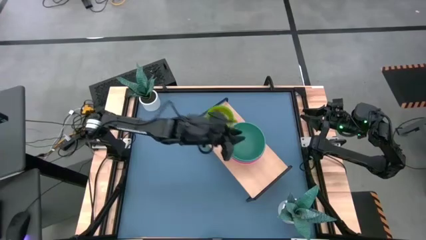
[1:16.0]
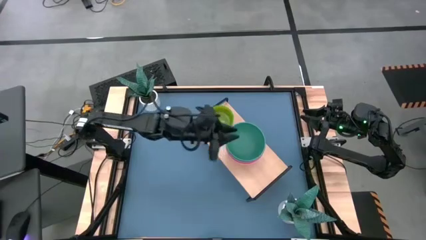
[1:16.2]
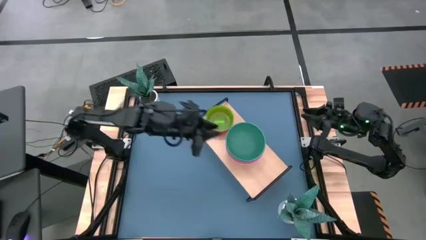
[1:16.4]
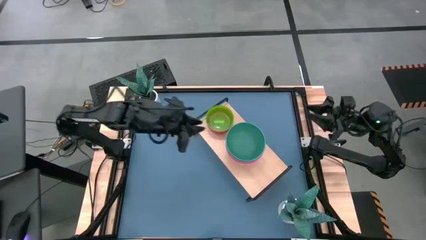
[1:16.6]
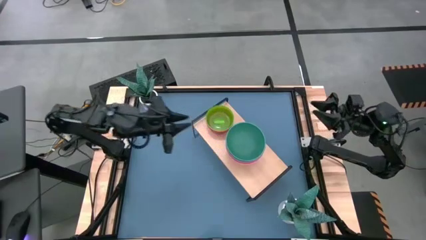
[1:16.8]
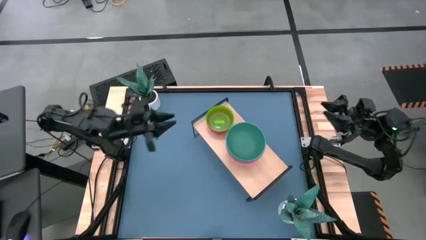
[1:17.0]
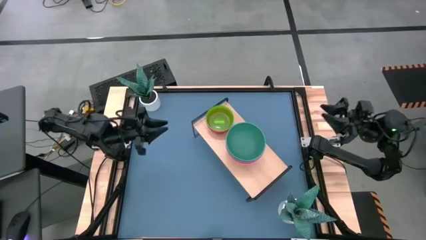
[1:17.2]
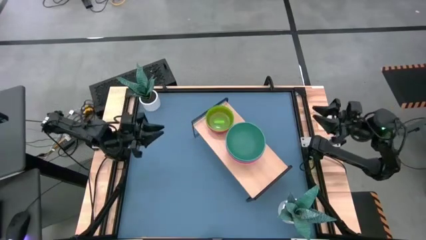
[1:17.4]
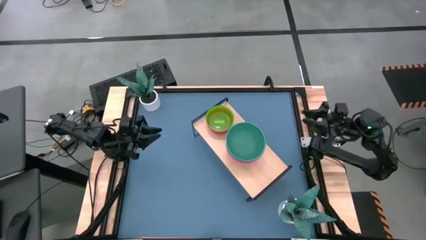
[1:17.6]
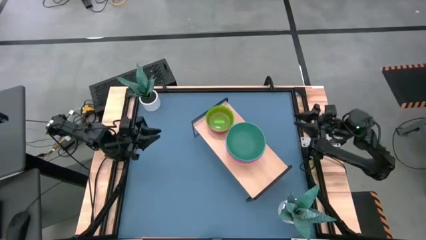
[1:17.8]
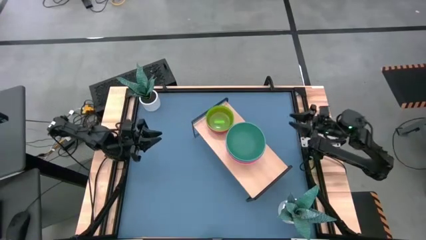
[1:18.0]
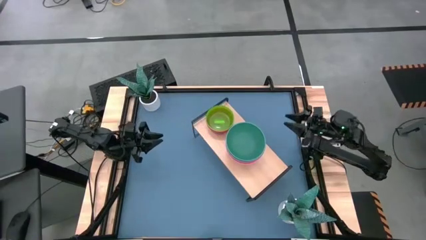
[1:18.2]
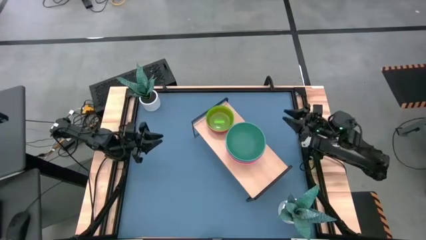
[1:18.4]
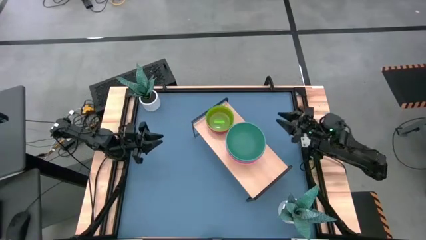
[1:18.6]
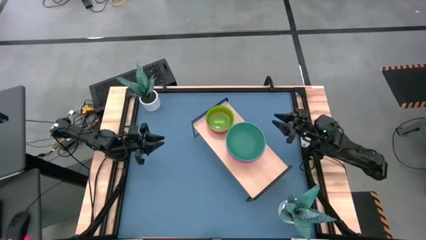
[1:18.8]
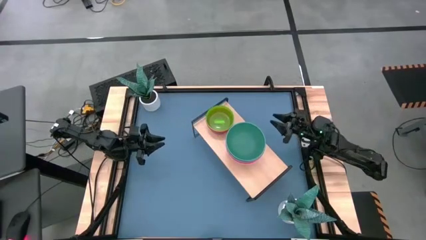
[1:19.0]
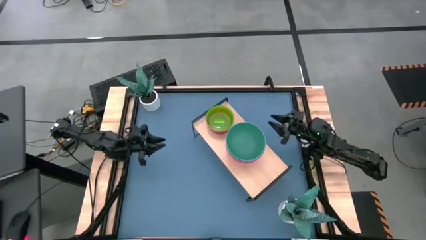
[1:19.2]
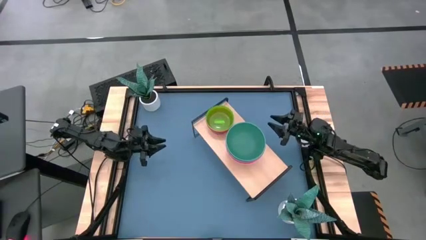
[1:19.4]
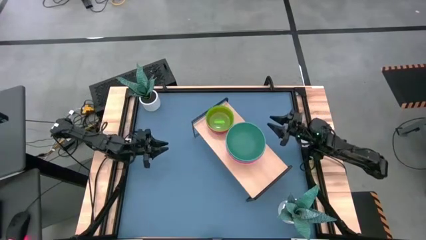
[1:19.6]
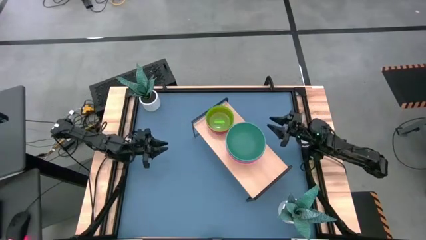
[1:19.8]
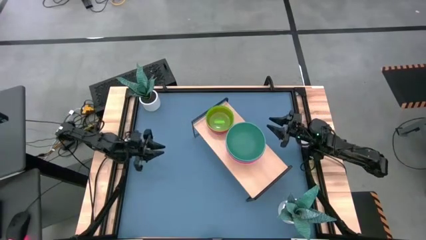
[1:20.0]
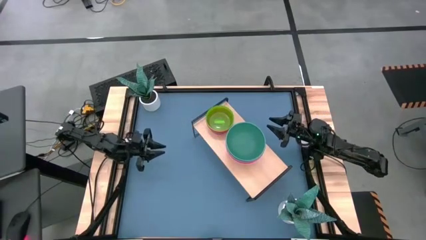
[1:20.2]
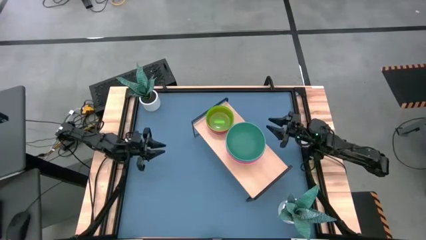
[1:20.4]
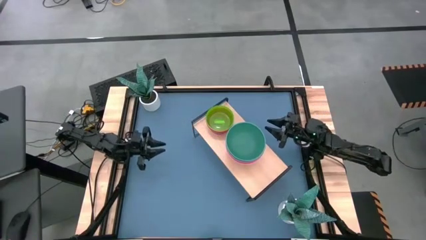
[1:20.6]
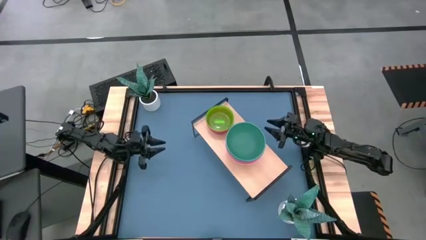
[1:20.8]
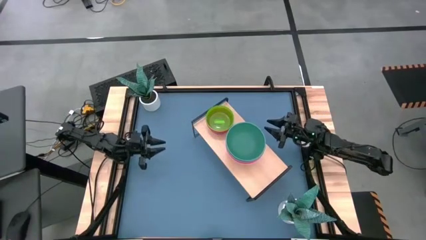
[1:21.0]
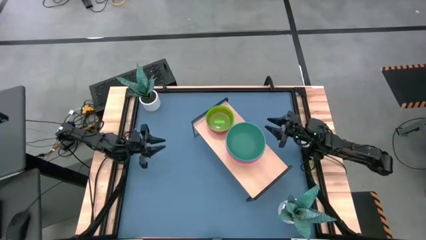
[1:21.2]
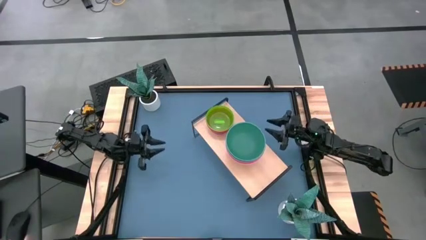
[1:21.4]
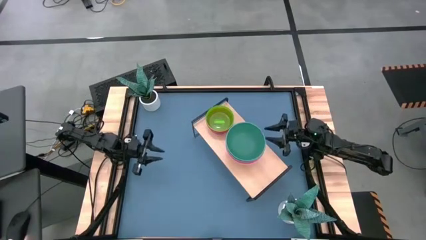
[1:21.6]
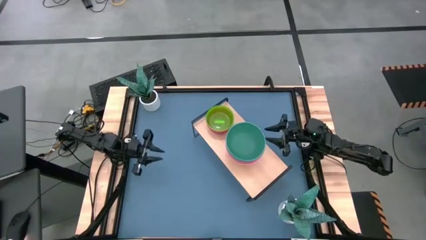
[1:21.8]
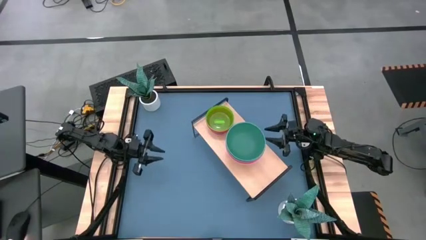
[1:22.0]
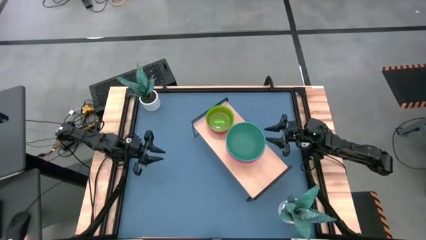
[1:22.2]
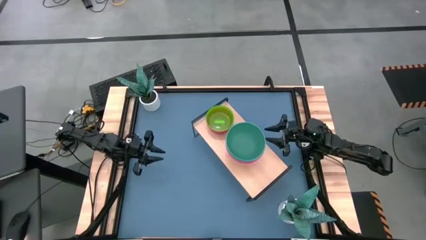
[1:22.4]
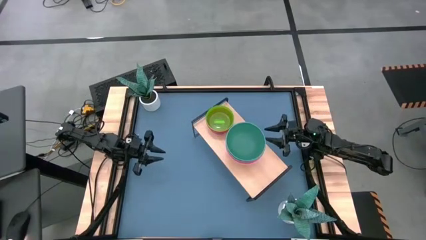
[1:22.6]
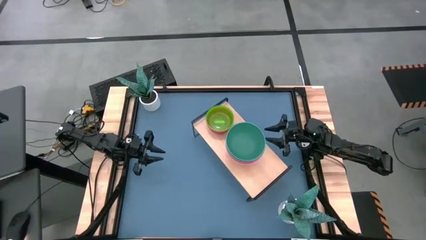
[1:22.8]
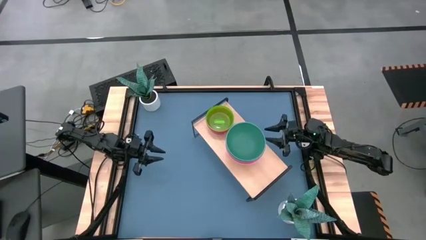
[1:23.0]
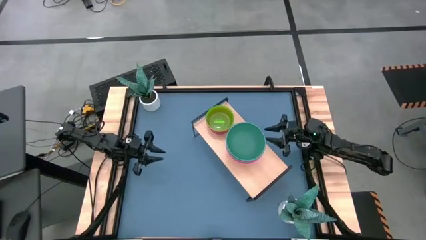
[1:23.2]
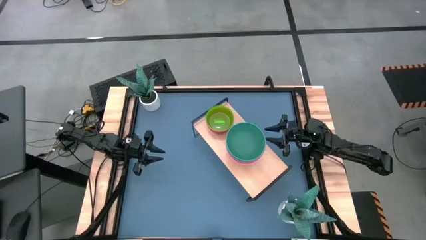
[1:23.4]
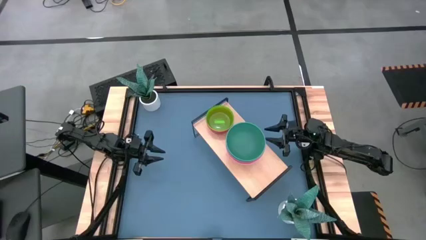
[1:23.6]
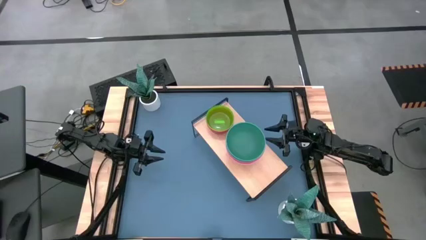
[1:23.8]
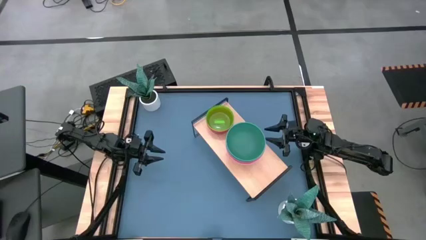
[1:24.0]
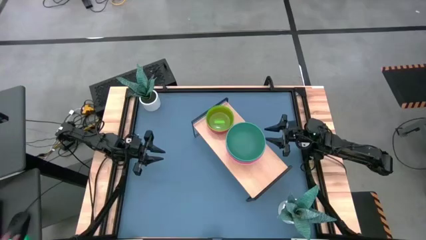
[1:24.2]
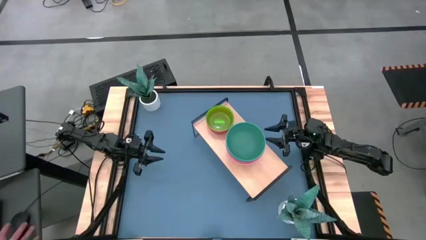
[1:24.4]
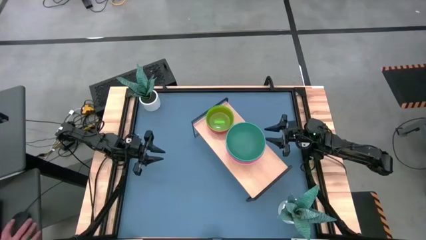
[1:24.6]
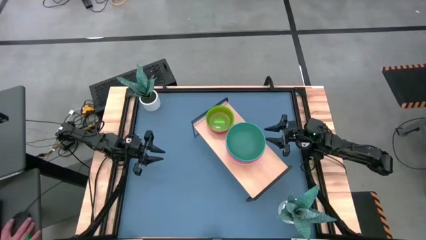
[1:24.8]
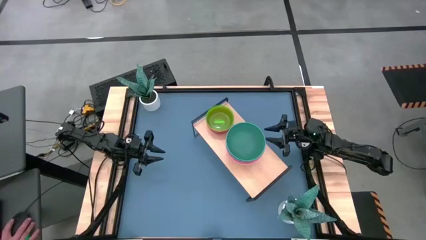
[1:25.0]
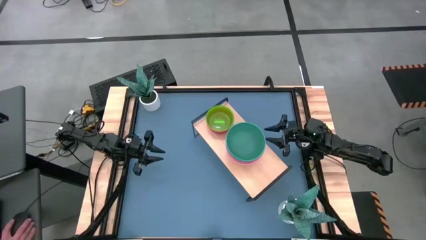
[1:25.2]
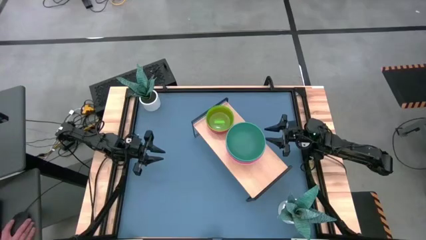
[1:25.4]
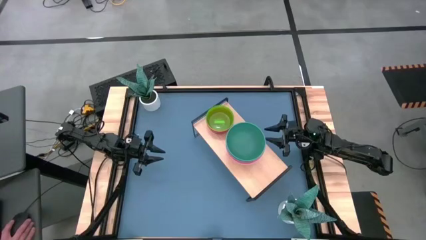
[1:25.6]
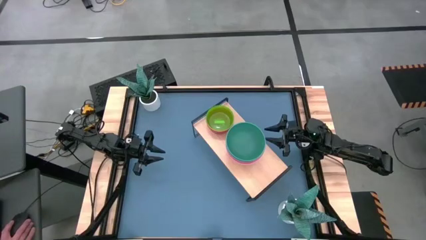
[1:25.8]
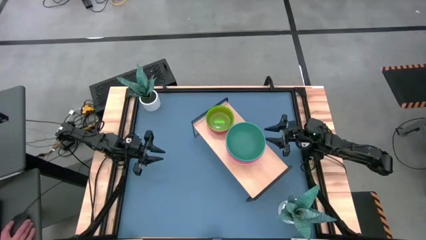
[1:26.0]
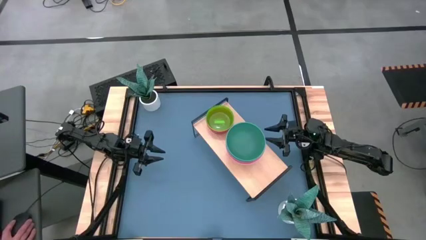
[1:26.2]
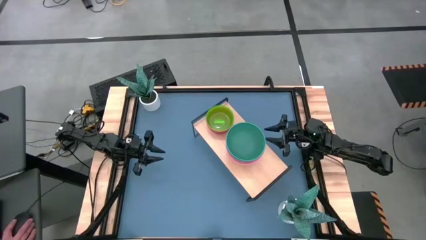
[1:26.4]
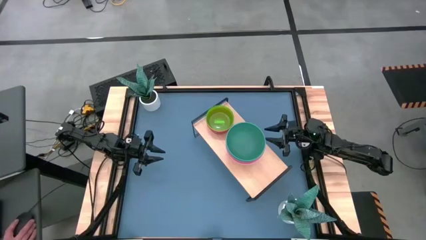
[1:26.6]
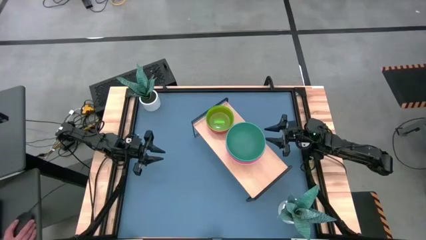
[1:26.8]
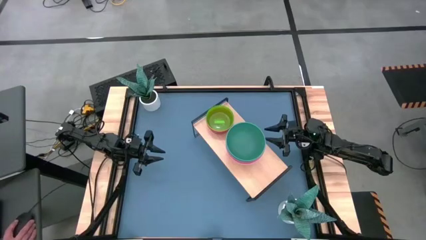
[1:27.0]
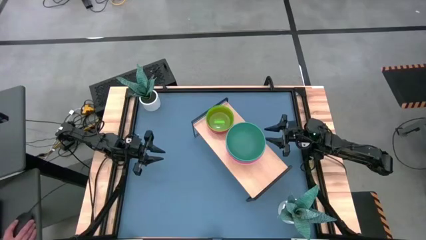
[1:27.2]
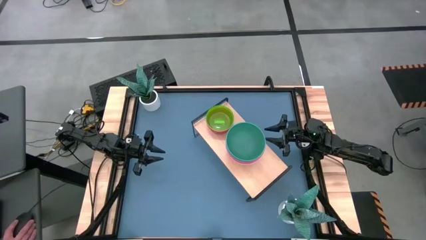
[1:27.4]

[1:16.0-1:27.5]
Task: Place and stack bowls onto a shelf
Return to Home Position

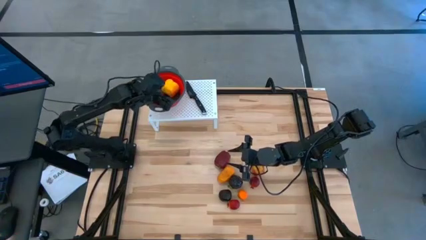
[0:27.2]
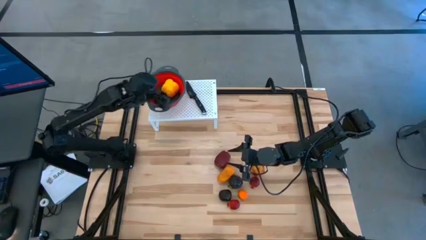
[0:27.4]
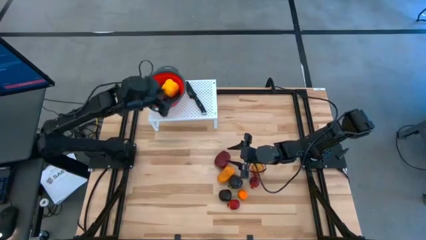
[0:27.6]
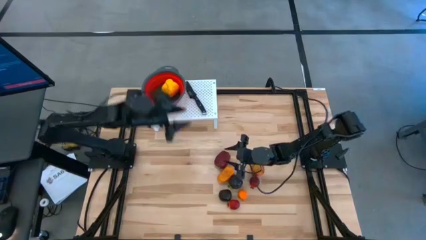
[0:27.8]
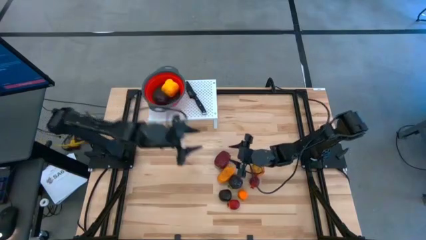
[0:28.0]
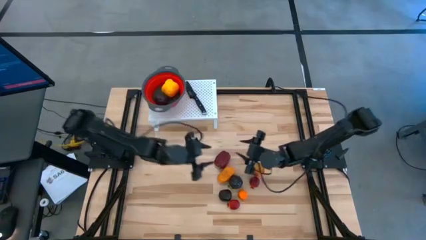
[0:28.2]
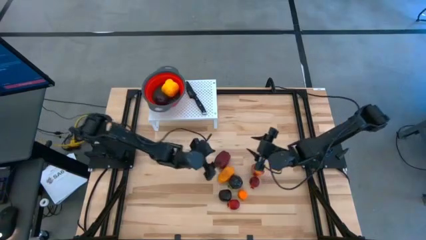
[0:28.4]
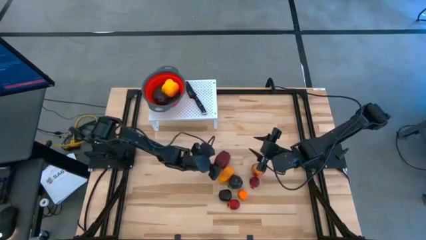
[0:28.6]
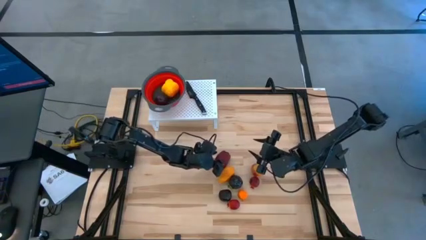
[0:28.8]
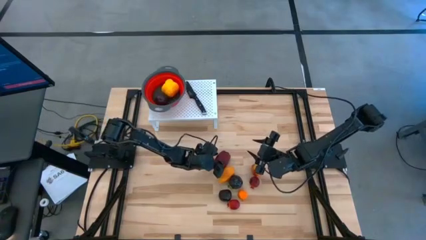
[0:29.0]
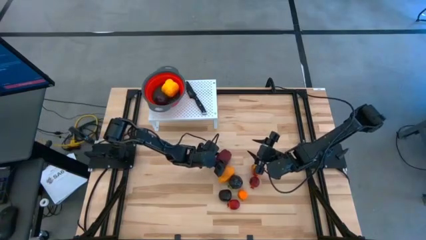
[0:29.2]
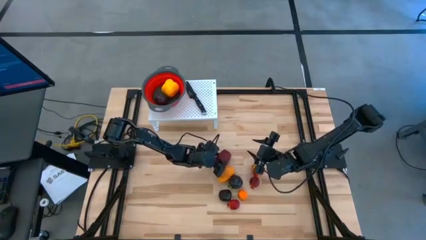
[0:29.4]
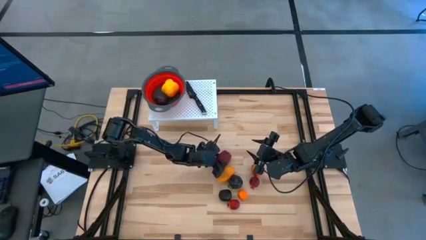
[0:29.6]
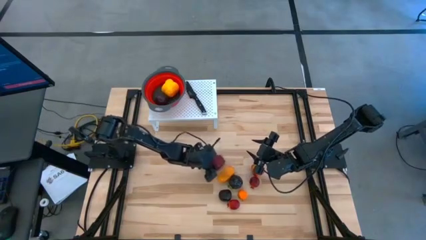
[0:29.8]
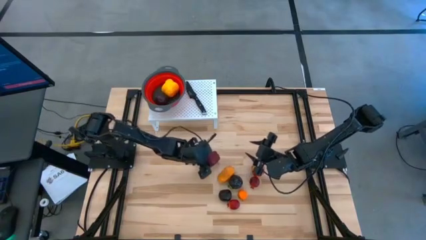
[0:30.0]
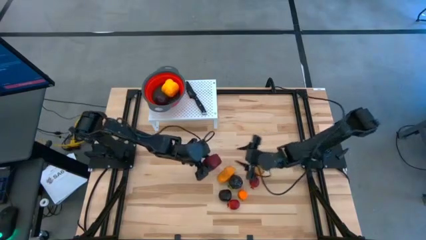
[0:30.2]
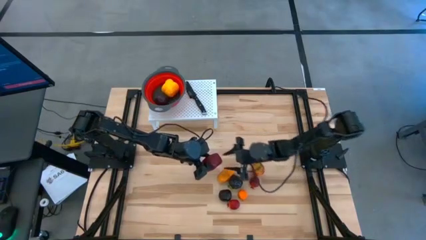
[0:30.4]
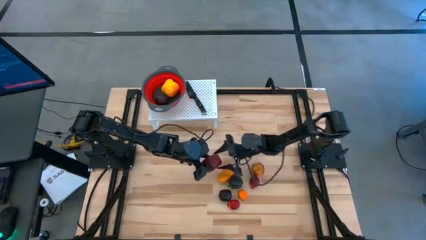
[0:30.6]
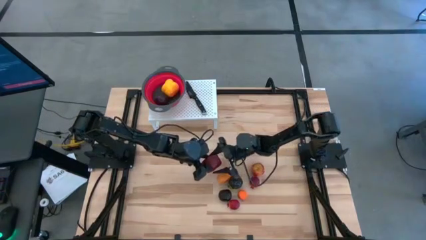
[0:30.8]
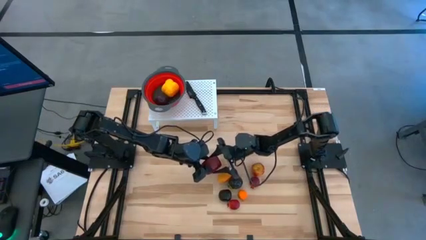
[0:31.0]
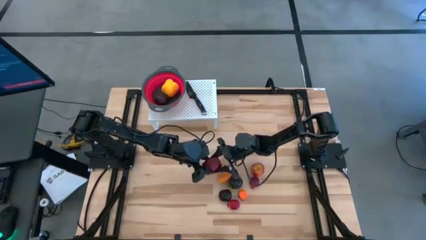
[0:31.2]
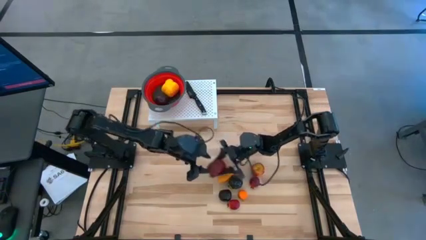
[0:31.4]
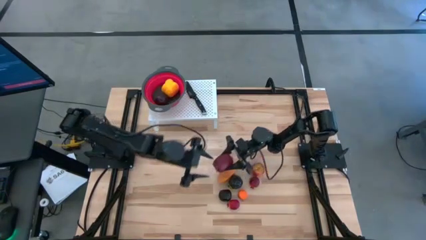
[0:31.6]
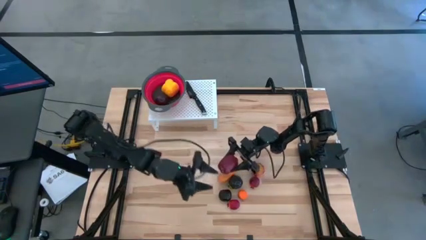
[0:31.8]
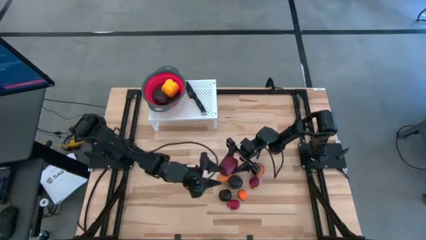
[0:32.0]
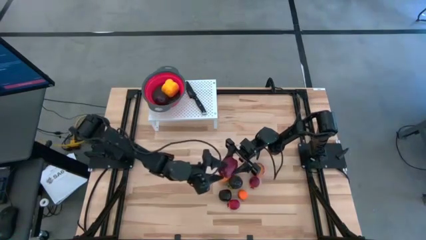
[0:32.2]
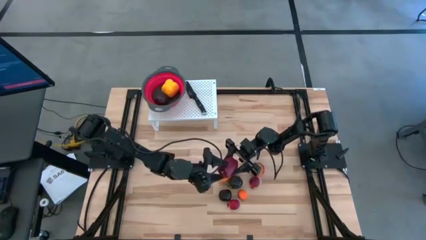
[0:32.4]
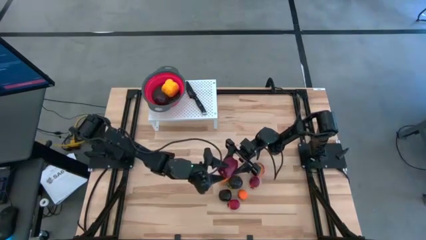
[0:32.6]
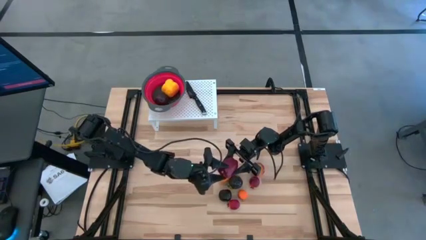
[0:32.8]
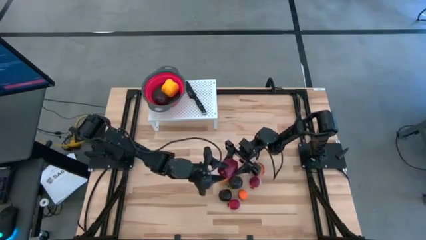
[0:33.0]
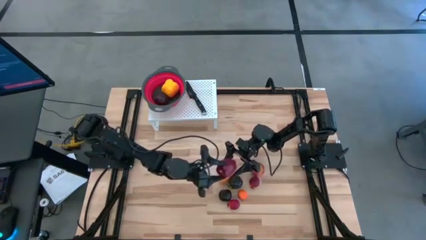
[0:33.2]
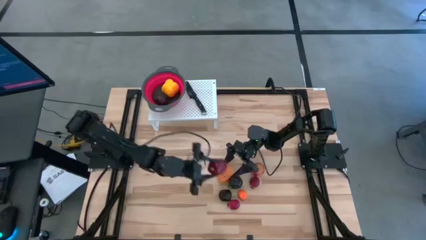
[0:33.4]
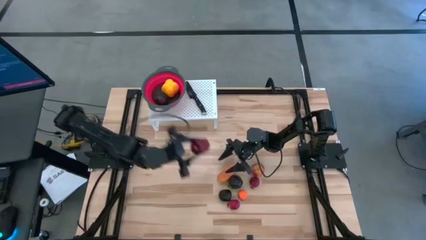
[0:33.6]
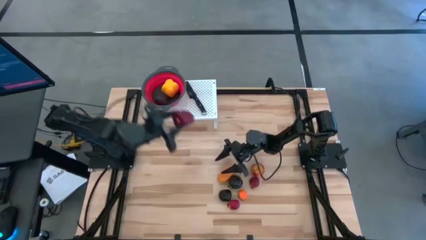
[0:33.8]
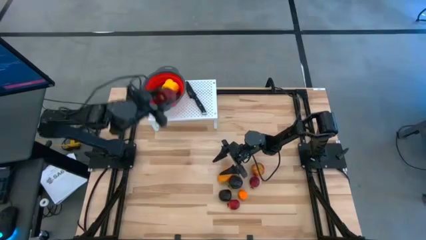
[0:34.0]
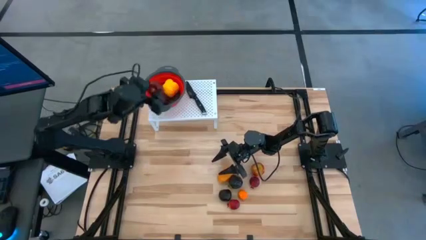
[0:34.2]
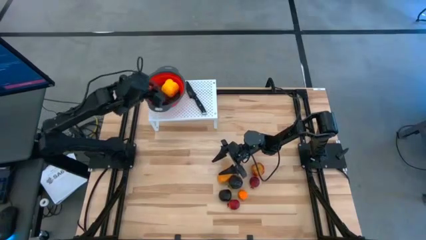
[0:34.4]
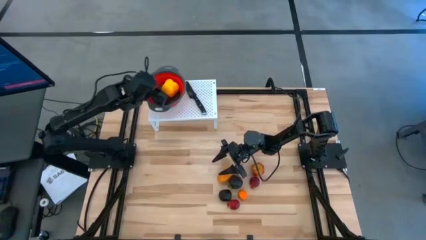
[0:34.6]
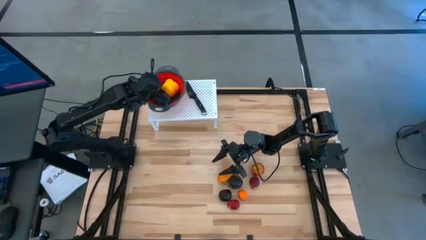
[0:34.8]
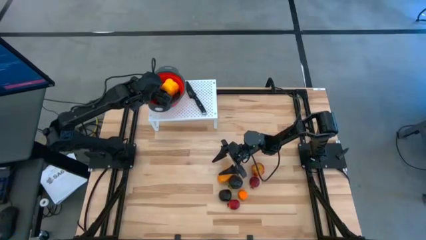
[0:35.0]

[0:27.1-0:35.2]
Task: Pick & Place Fruit
Put the left red apple into the red strainer bowl on the shelf
